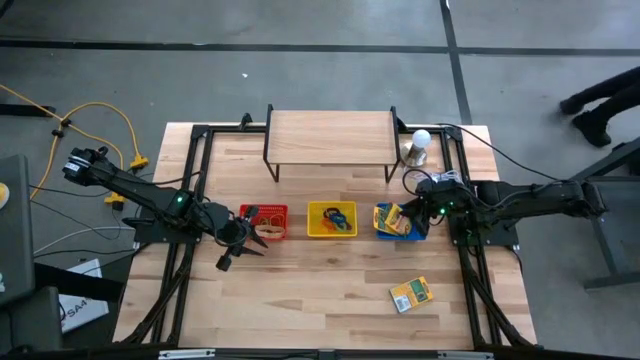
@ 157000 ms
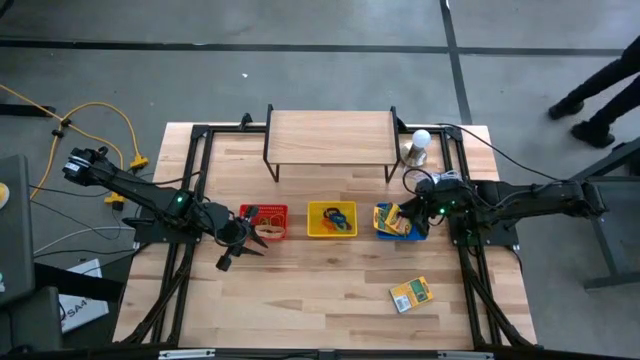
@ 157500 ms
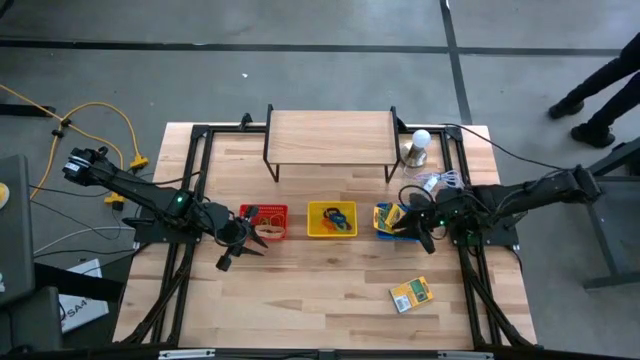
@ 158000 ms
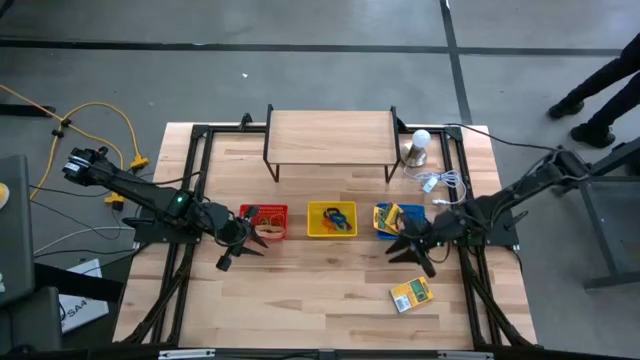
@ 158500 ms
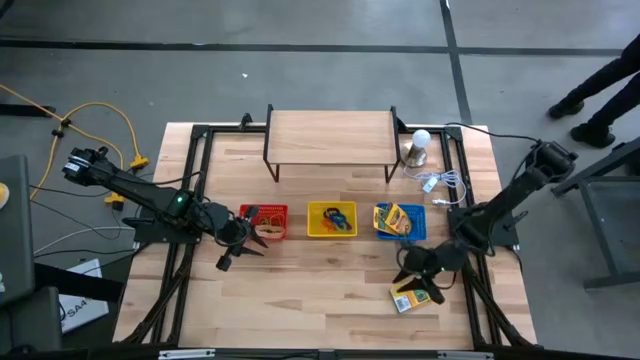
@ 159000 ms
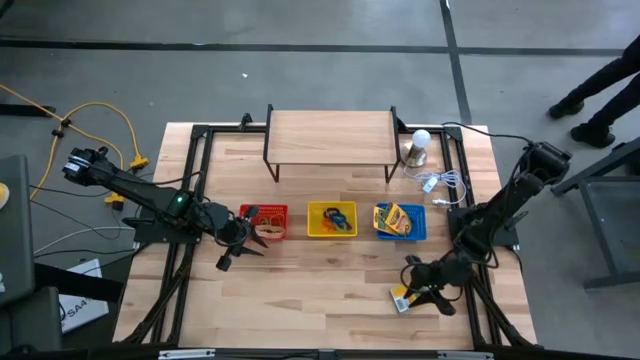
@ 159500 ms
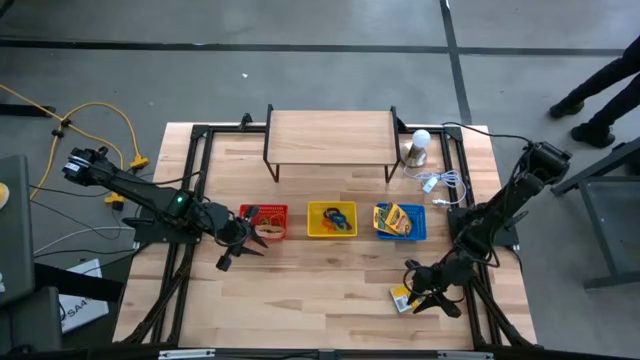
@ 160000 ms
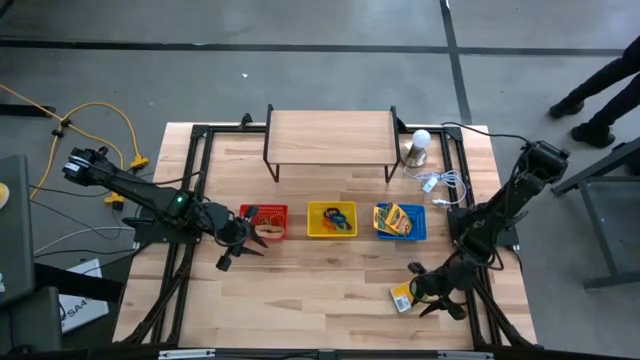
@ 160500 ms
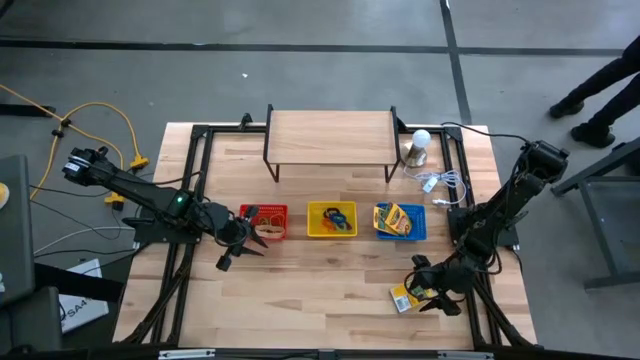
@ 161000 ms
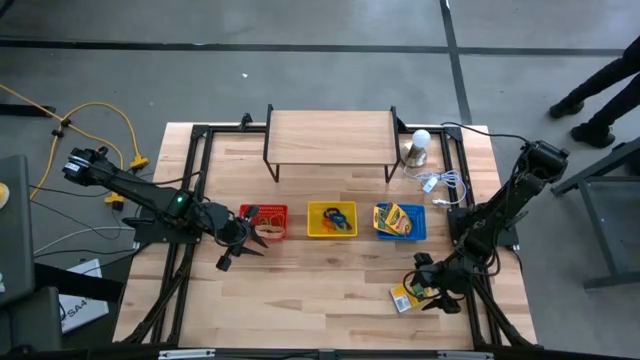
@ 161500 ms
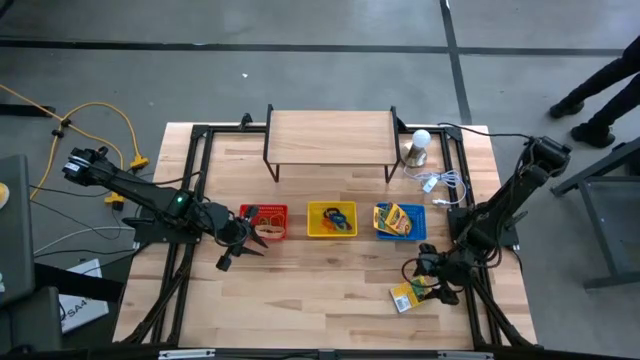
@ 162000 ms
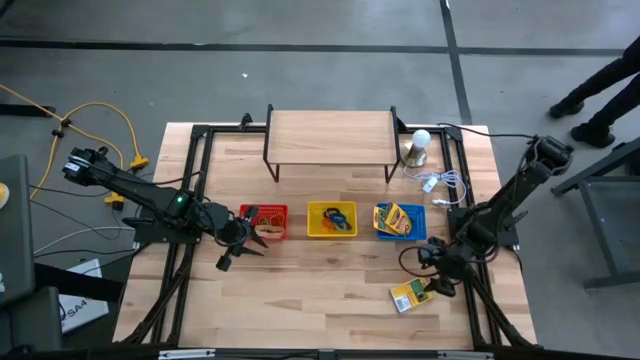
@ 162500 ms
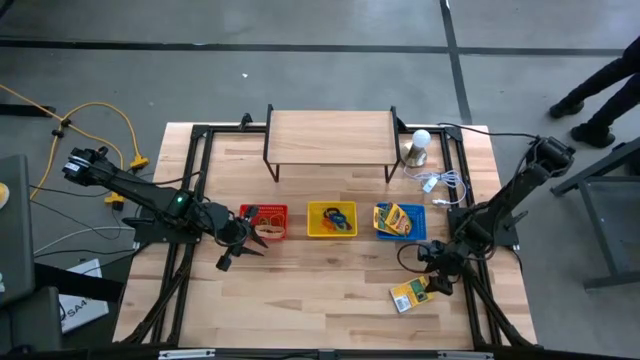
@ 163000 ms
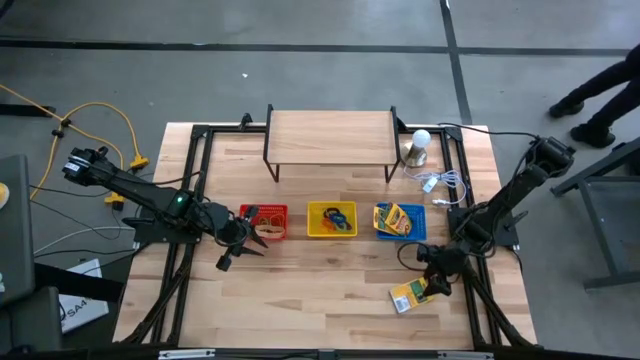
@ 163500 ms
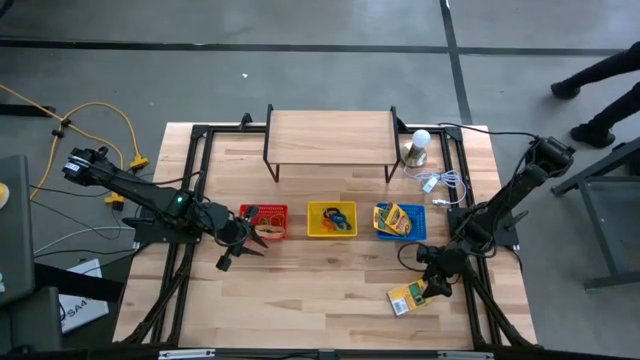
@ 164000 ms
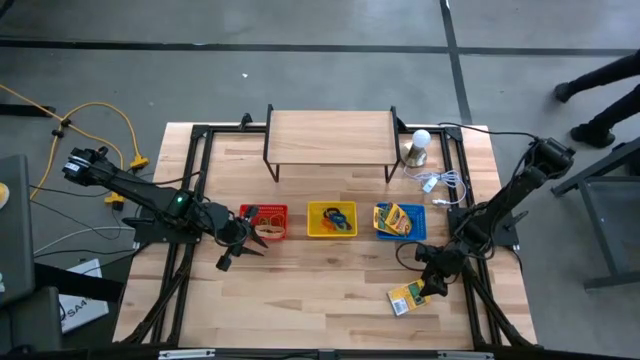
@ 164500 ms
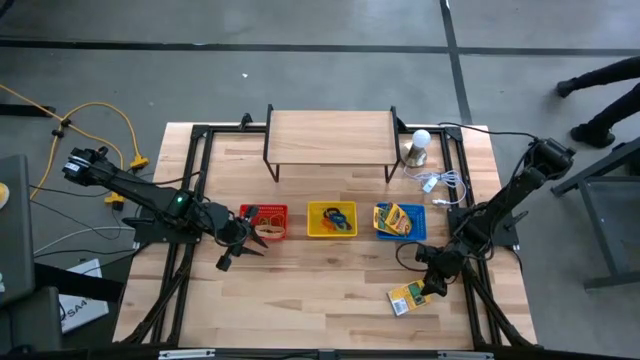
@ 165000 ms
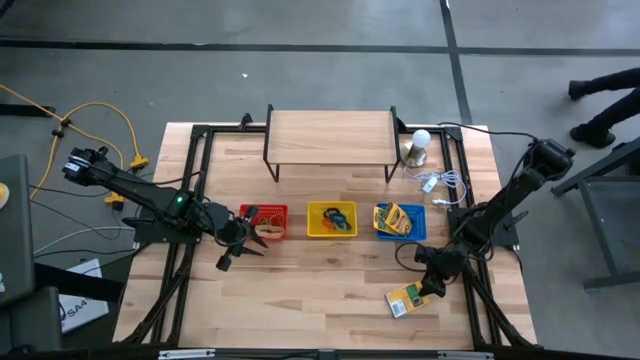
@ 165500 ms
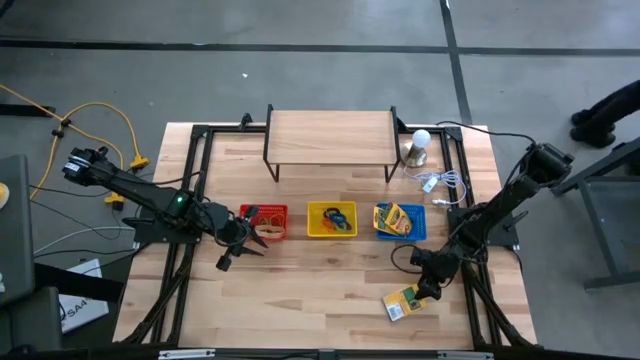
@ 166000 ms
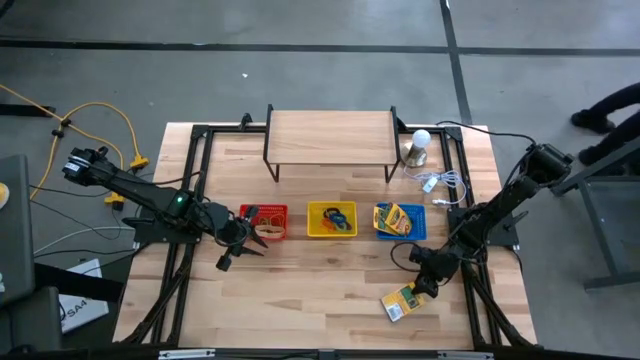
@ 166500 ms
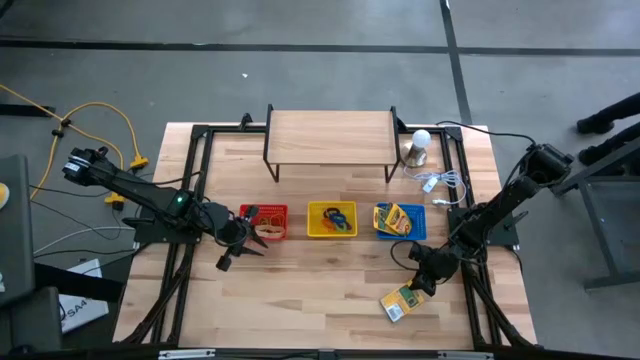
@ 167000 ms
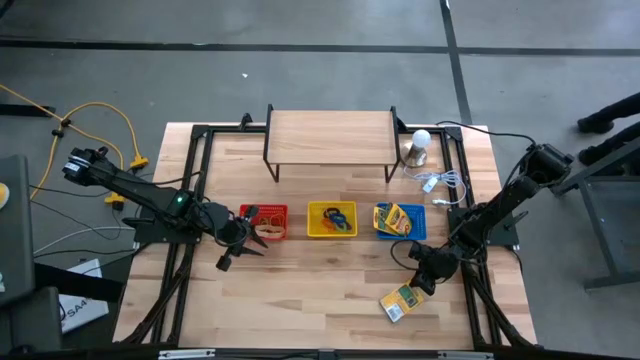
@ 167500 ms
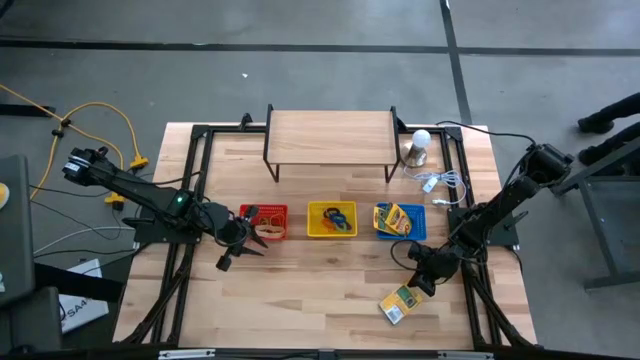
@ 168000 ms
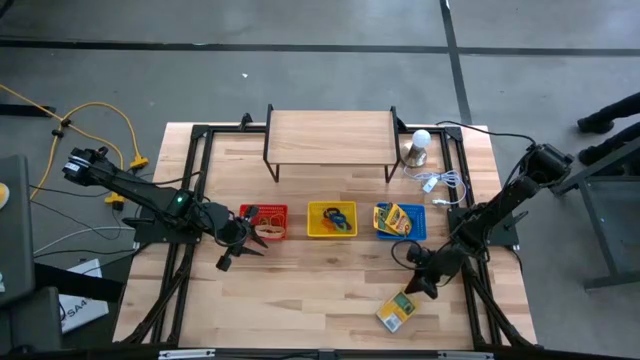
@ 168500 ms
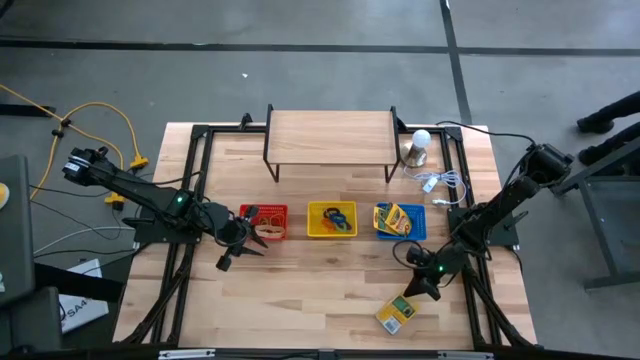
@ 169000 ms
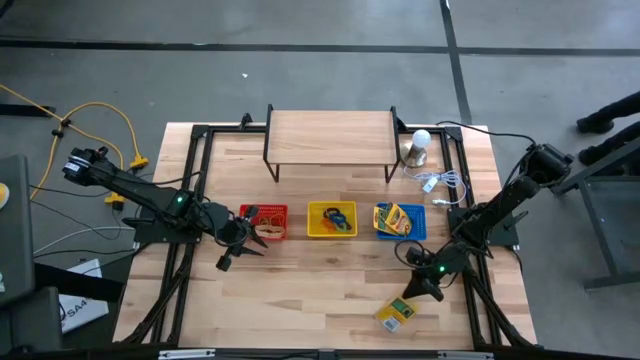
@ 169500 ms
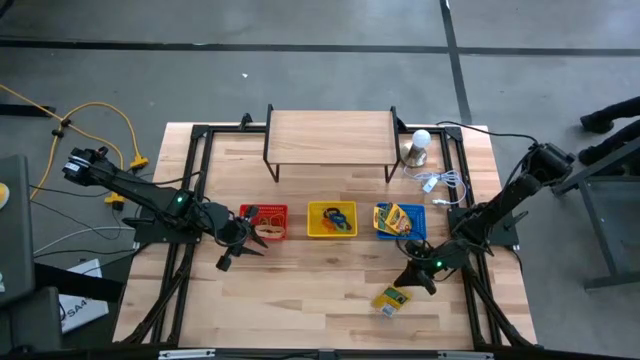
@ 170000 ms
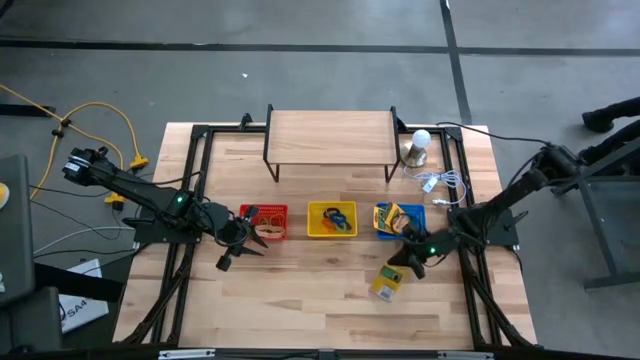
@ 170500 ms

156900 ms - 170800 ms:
Task: Pick & Place Office Desk Supplies
Put the box of crayons into the blue bin

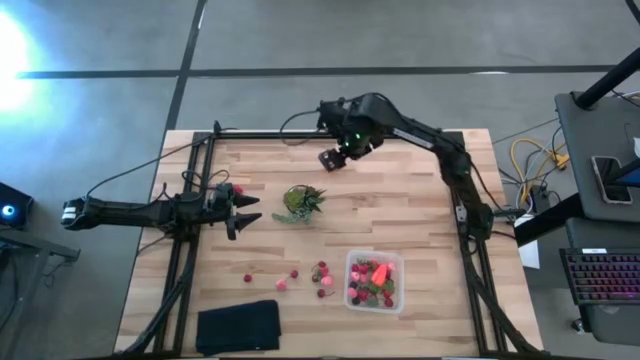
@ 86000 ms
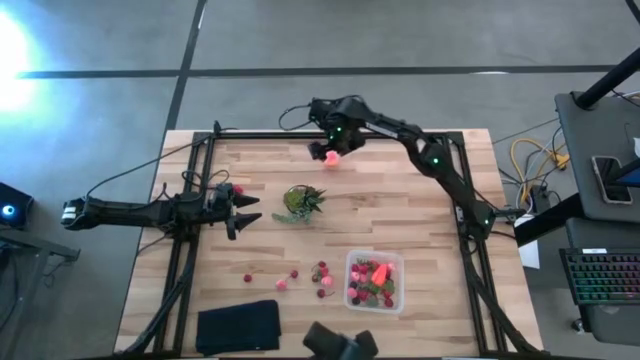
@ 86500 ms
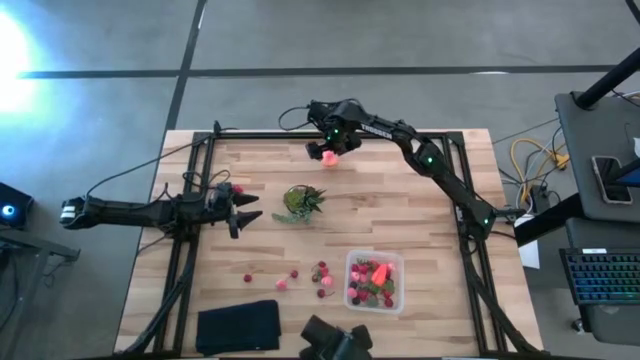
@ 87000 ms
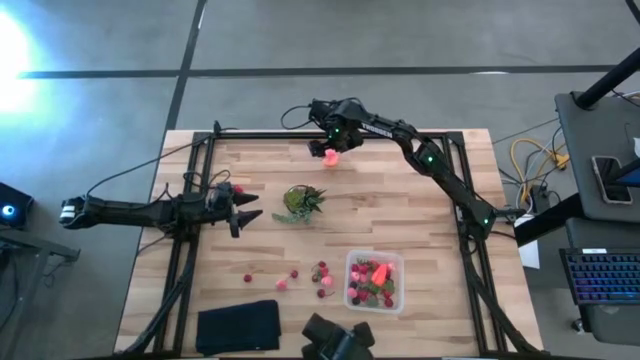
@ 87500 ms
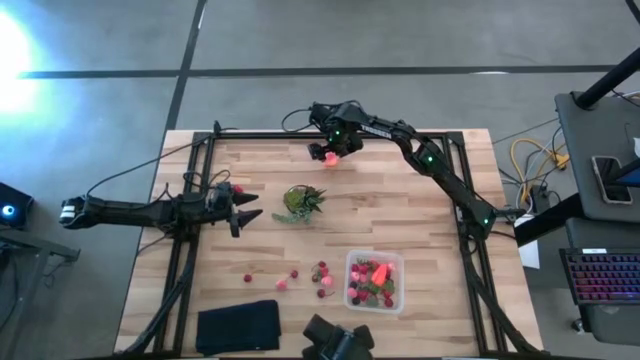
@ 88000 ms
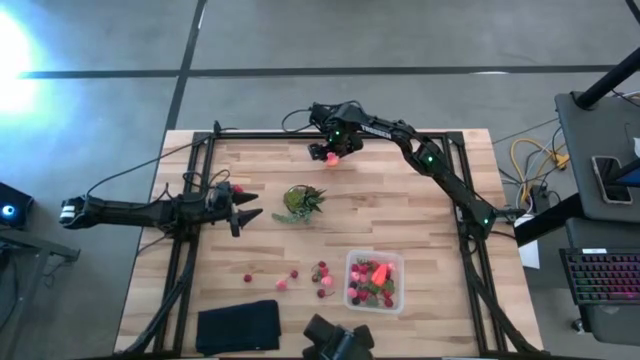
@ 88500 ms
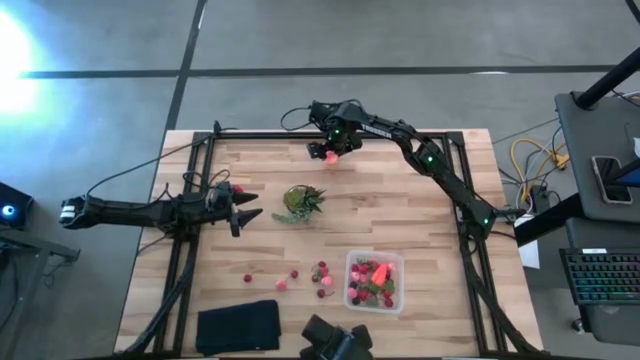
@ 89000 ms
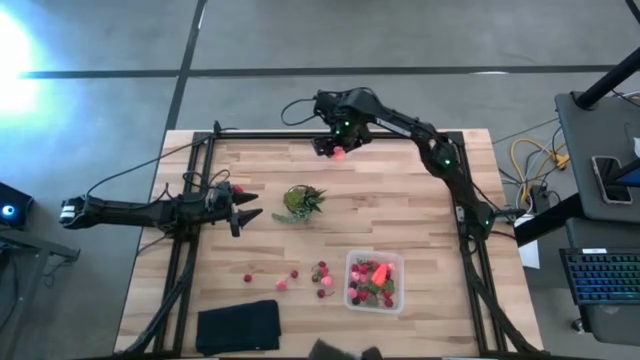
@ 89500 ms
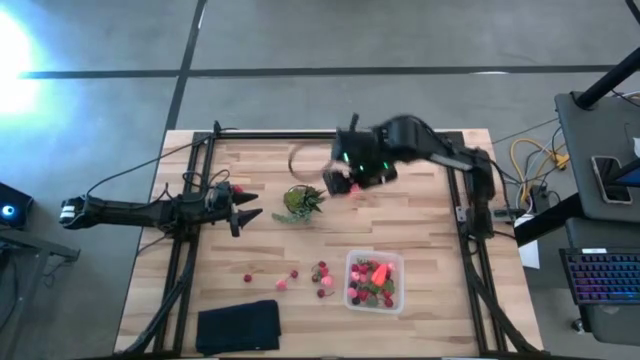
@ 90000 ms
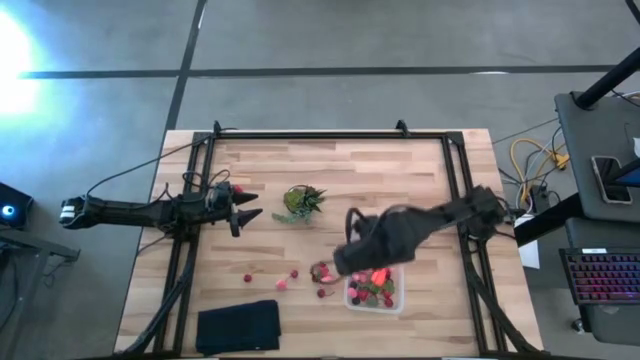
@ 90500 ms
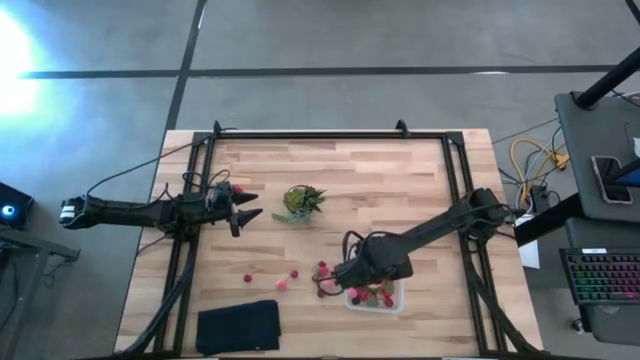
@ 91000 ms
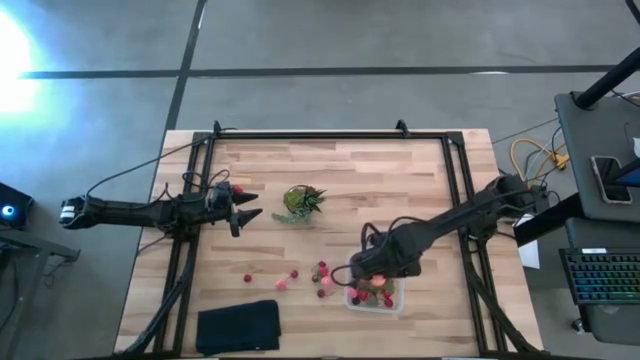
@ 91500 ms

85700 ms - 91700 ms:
Task: Pick and placing Produce into tupperware
Put the peach into the bin
